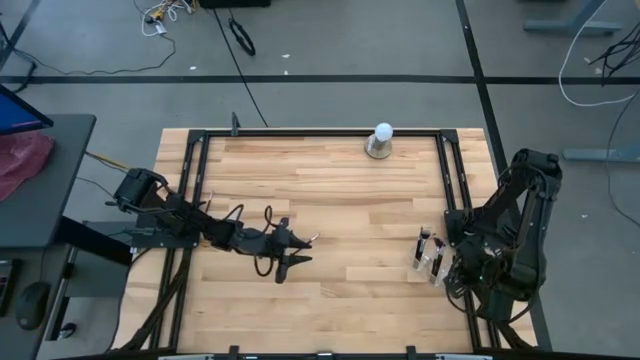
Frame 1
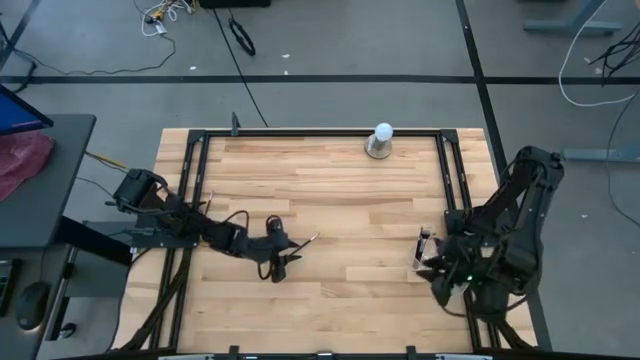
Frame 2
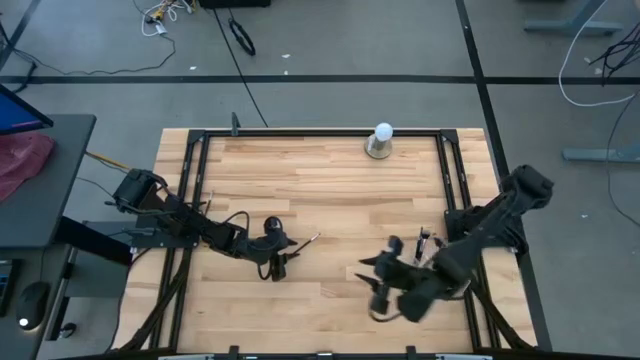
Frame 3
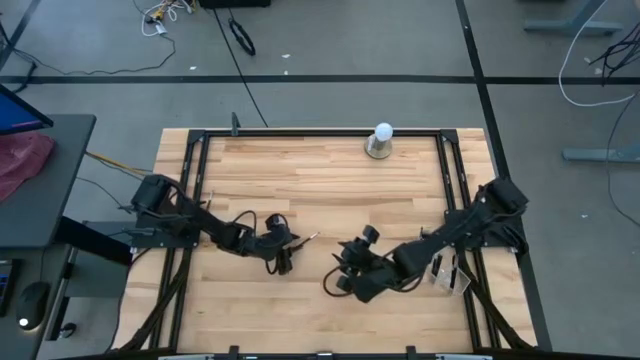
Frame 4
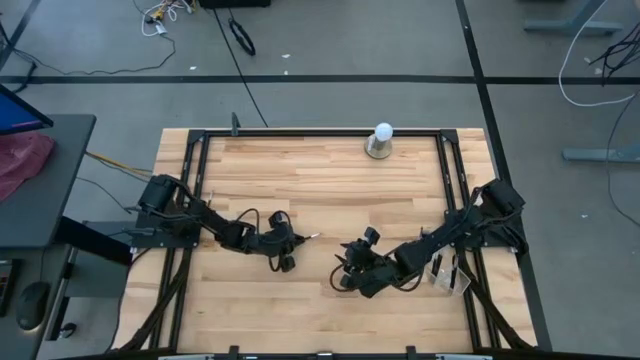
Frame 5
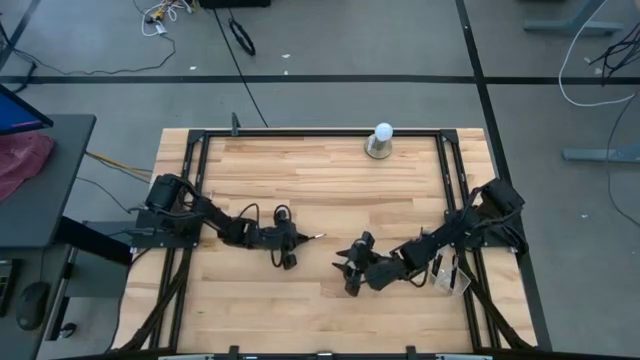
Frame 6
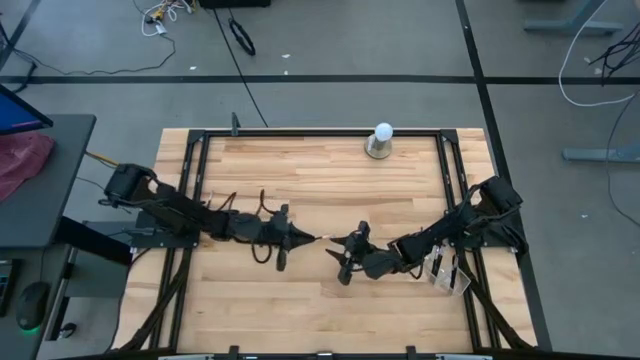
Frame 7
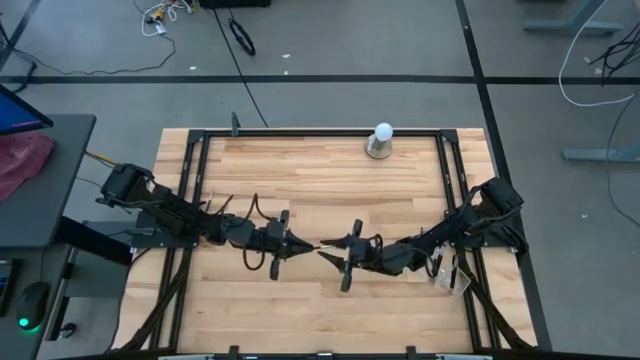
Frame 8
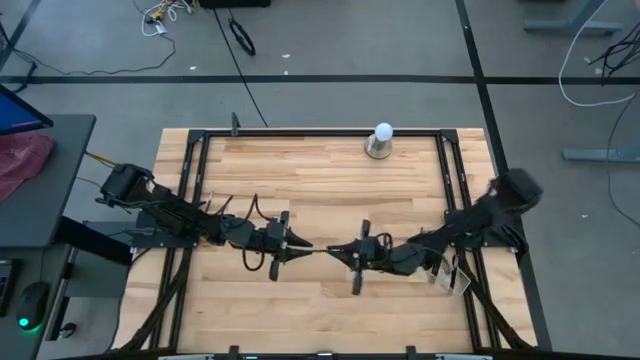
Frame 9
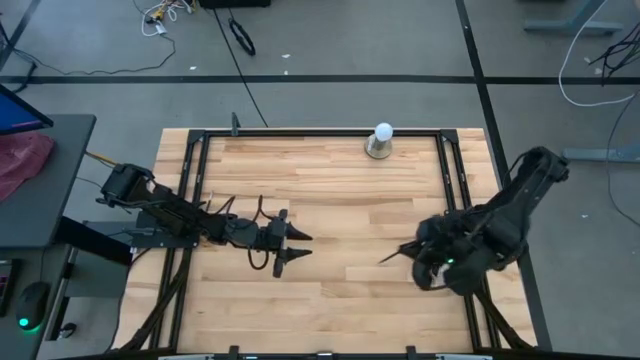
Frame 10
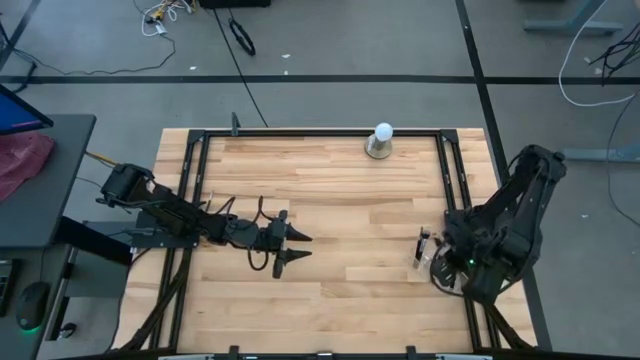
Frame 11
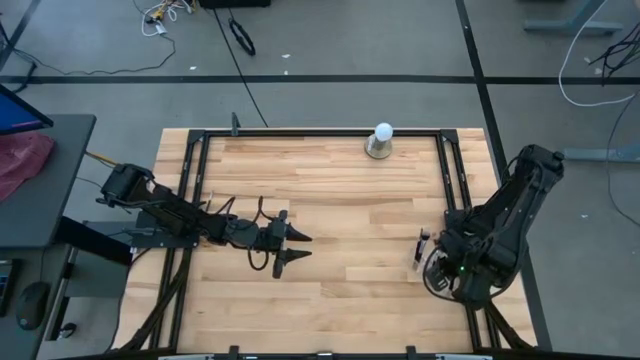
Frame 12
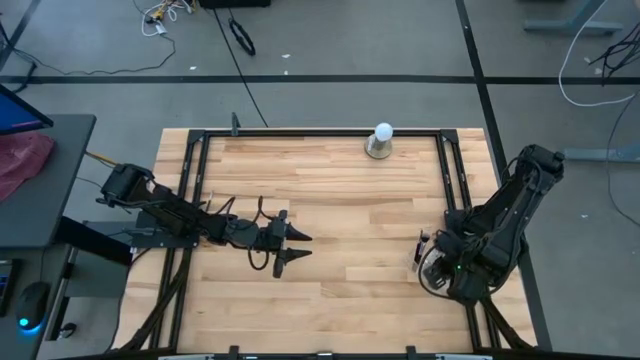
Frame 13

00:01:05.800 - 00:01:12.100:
Task: Put items in baskets/containers
Put the black eyeshadow brush into the transparent organizer

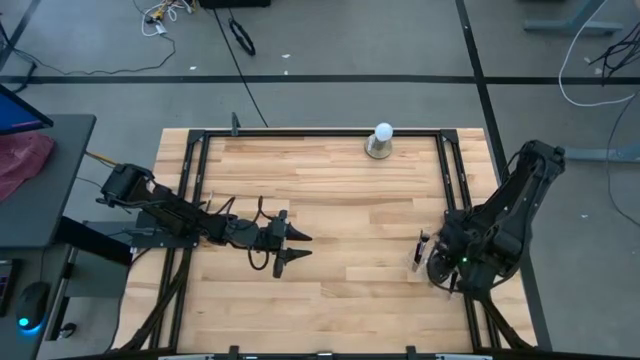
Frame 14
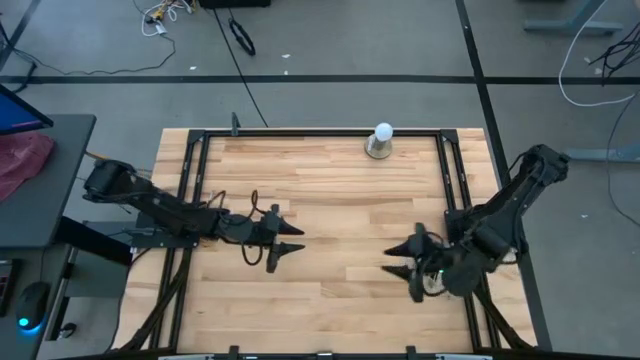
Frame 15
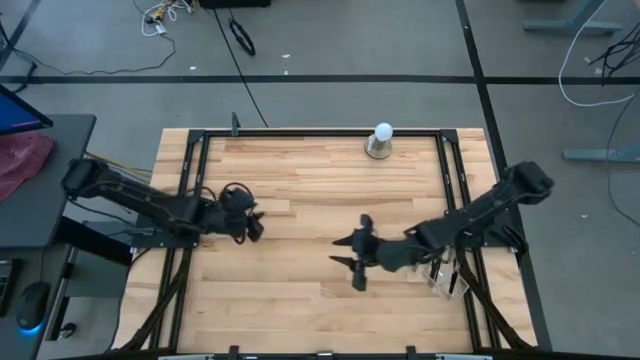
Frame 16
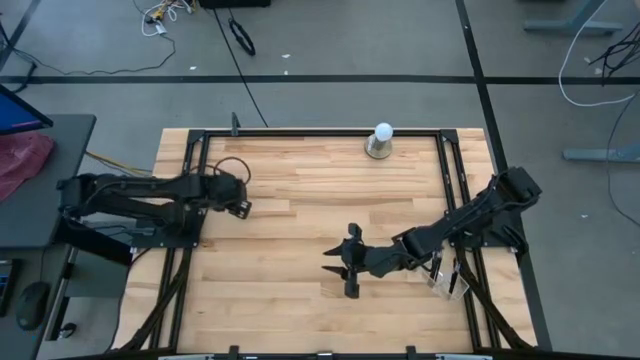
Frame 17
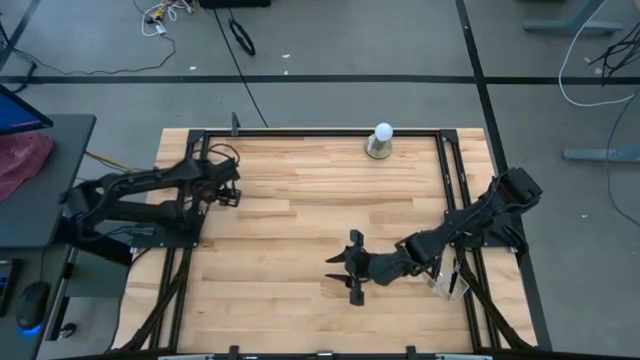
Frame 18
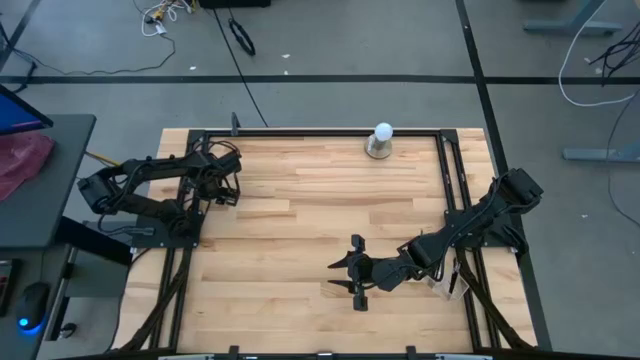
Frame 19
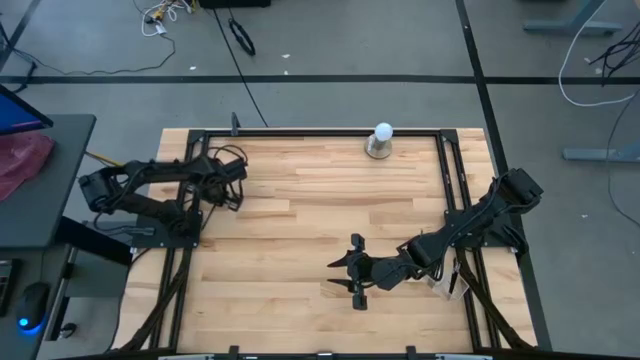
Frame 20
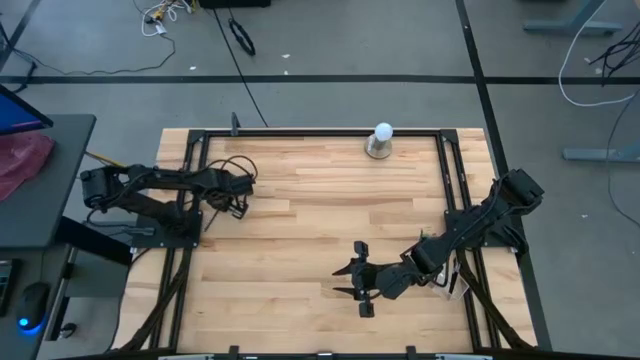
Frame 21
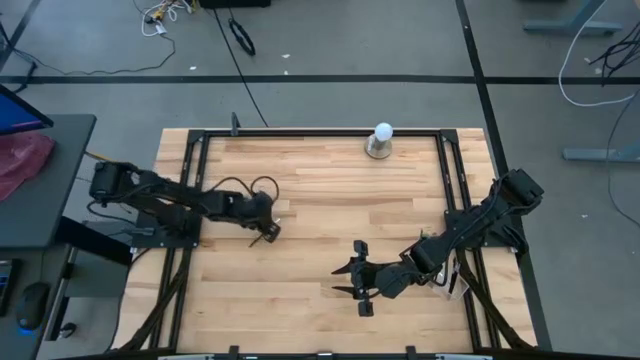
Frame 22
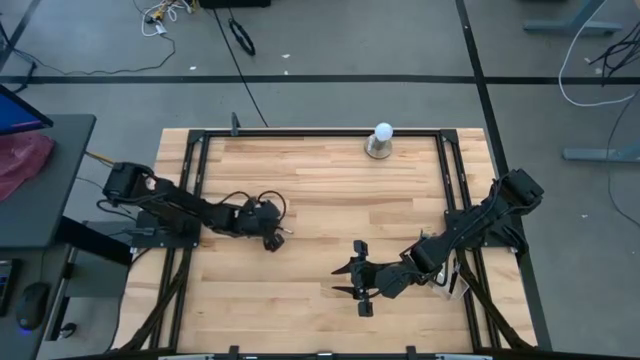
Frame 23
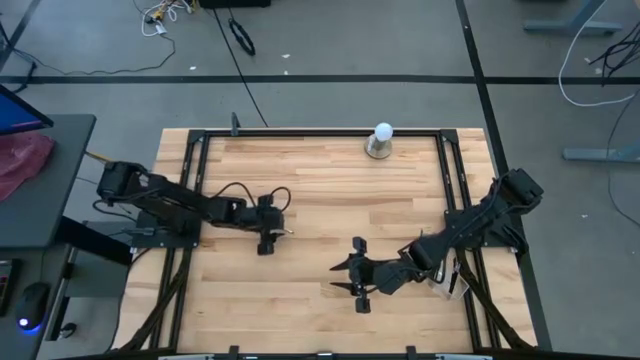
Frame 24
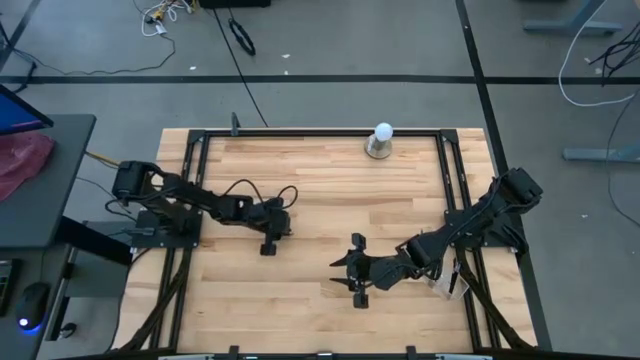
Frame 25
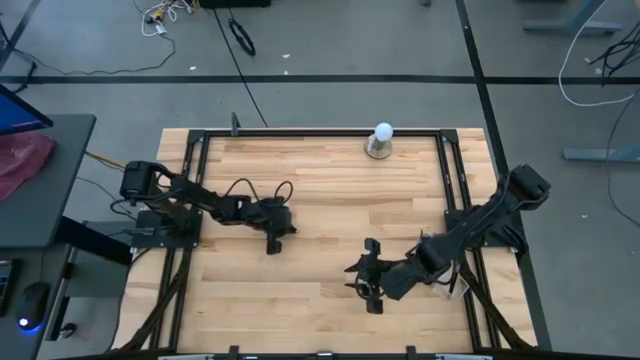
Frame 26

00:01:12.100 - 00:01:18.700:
Put the black eyeshadow brush into the transparent organizer

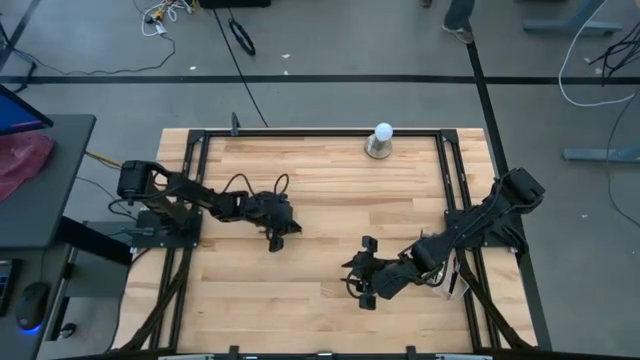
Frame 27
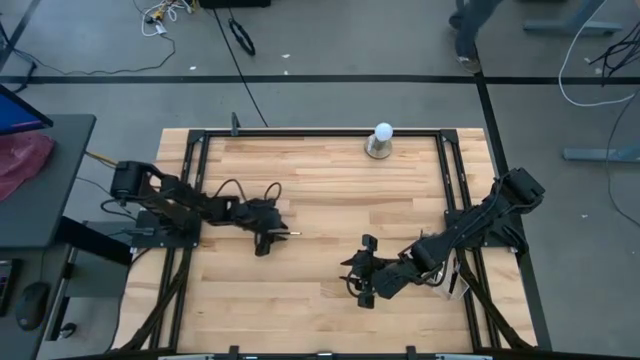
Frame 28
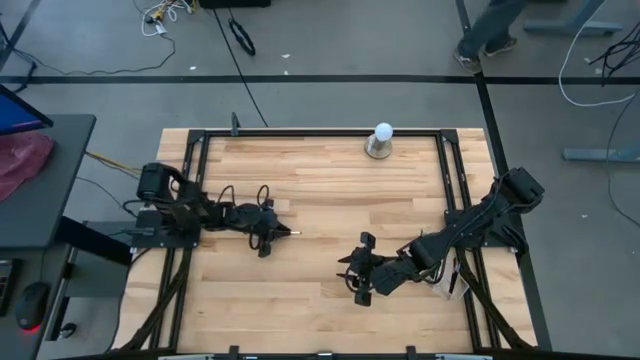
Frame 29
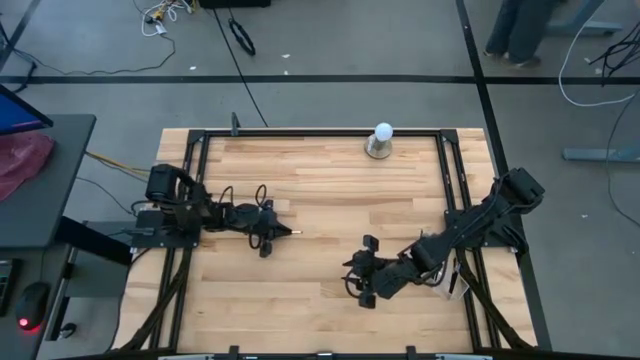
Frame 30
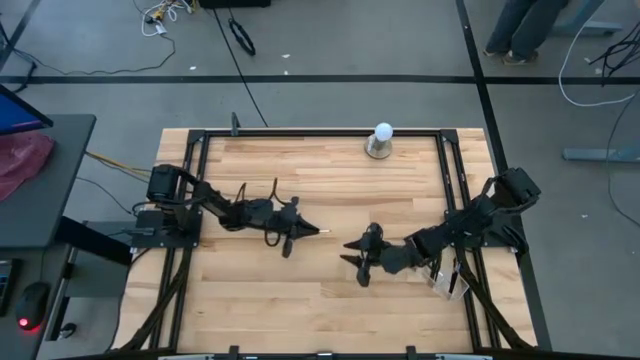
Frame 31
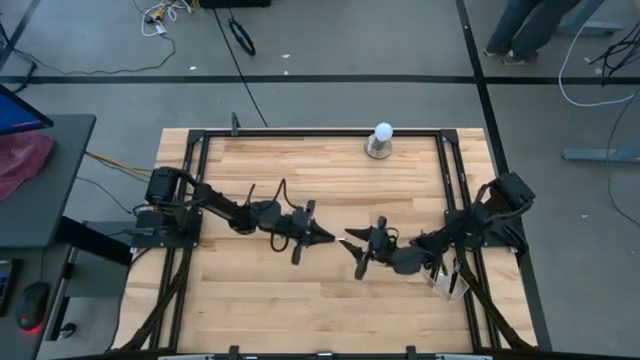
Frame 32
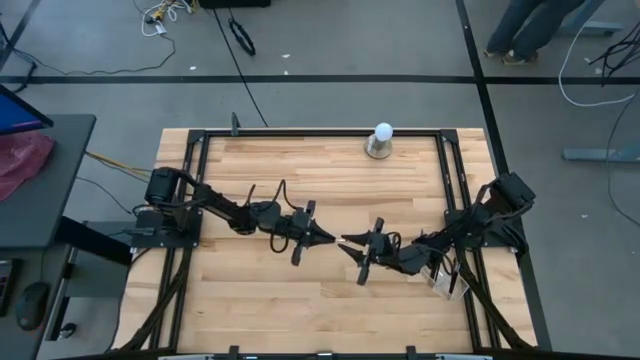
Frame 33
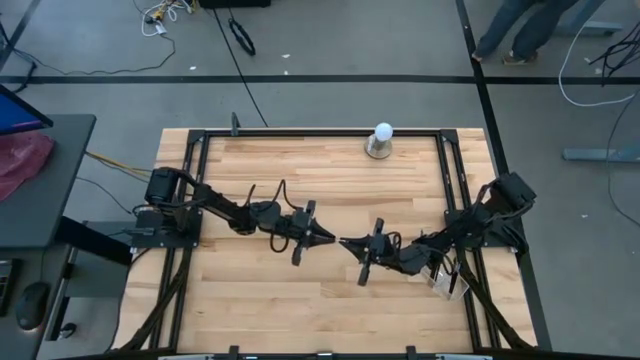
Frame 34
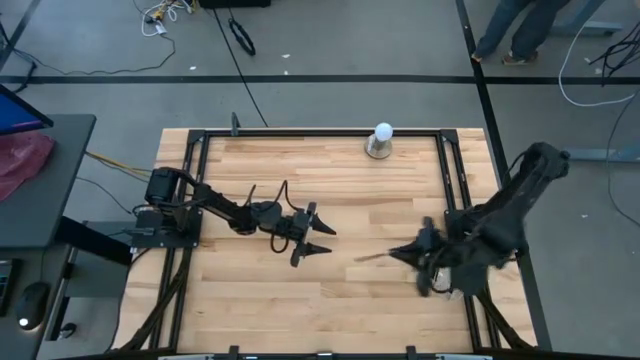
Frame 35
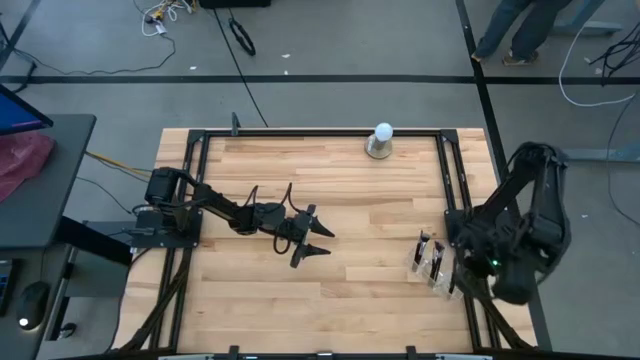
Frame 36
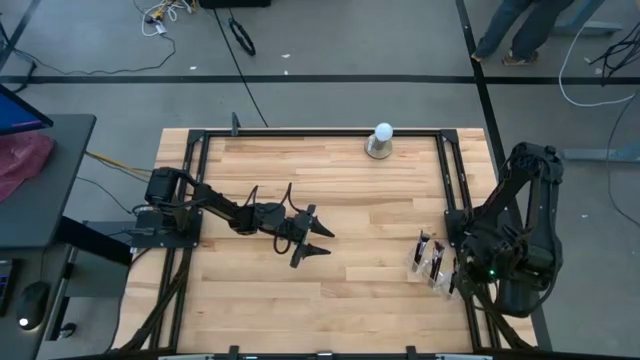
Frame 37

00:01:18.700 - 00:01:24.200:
Put the black eyeshadow brush into the transparent organizer

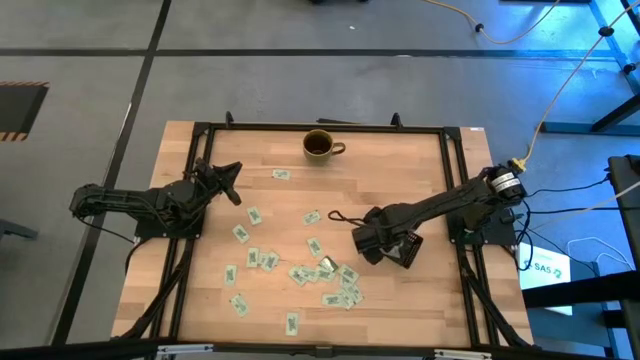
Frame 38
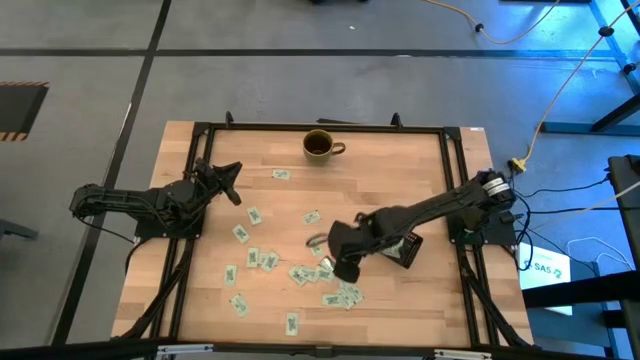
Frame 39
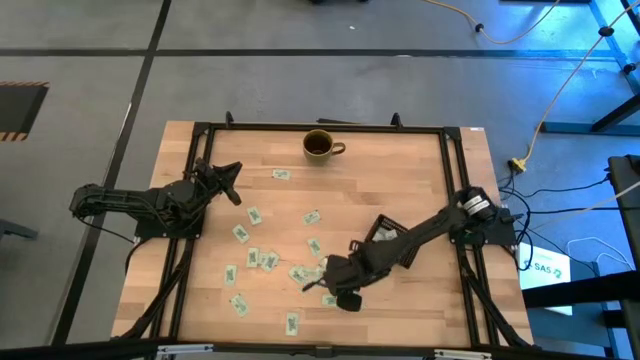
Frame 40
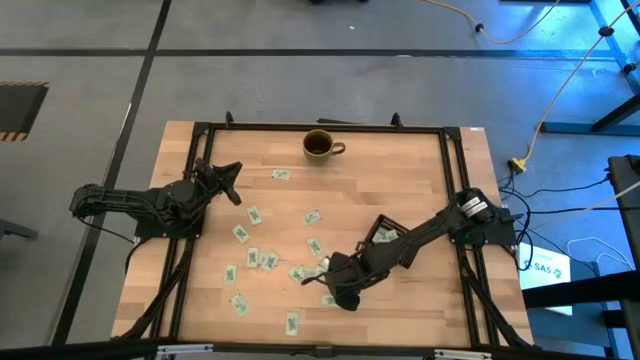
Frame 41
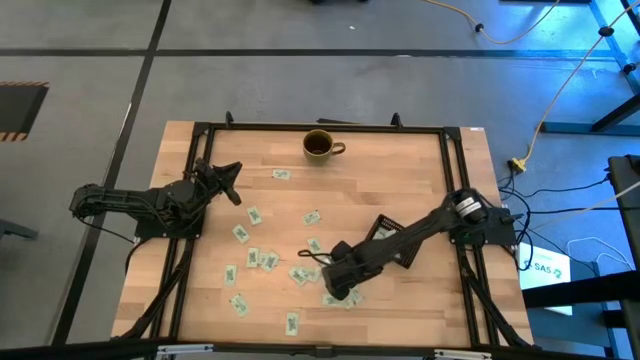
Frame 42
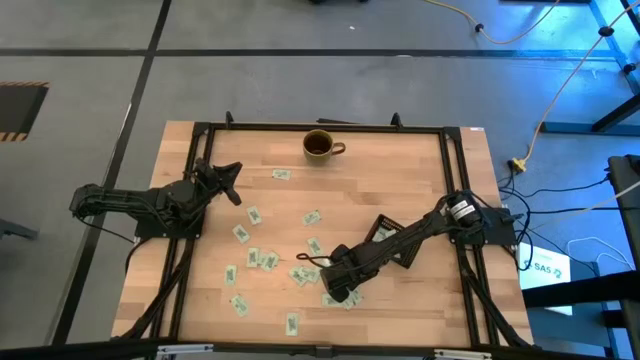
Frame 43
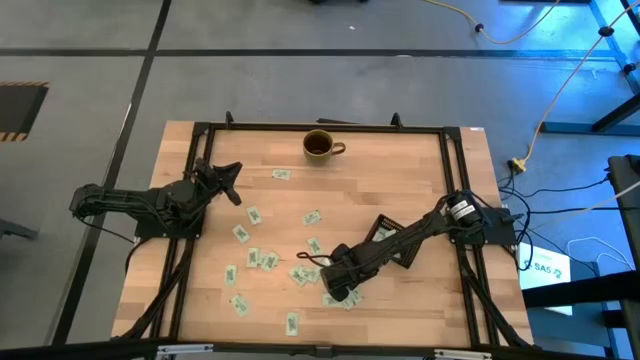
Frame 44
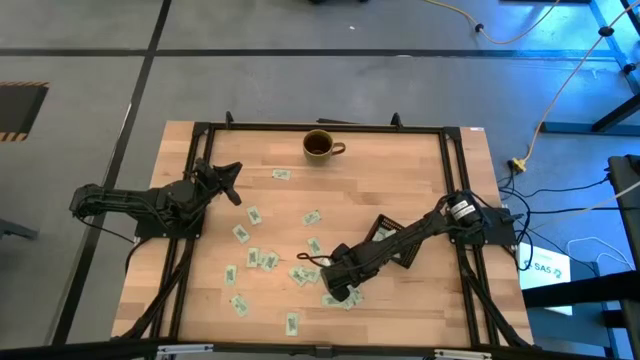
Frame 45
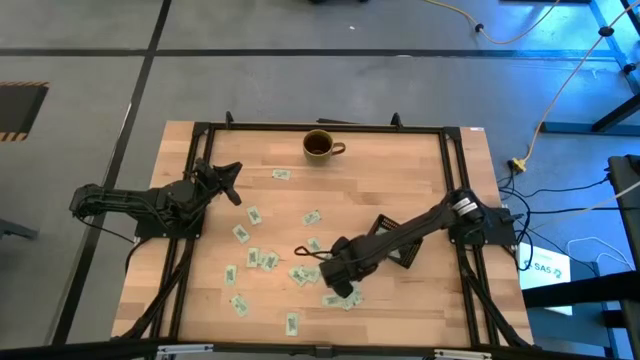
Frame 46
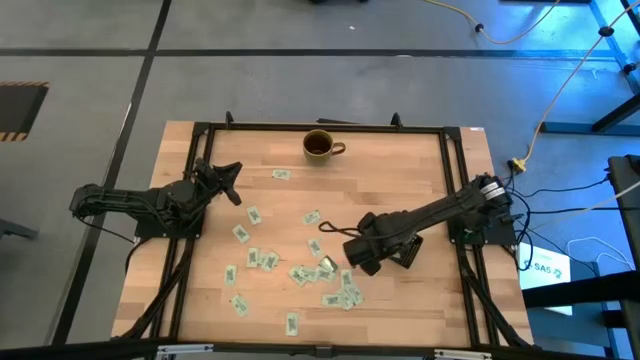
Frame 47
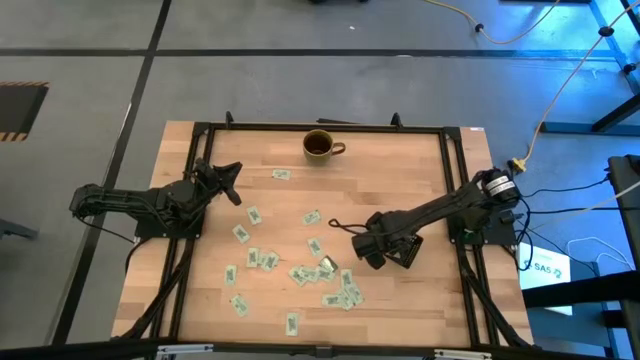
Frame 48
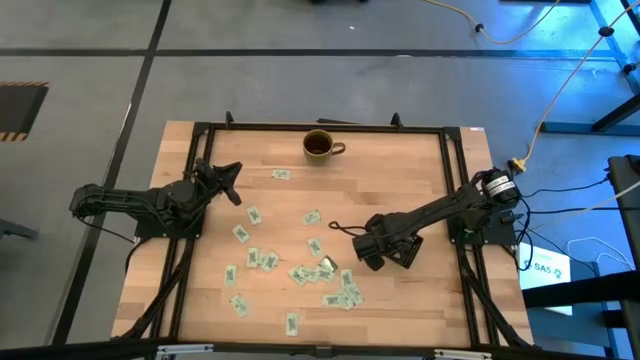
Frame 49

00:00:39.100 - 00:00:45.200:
Task: Pick and place Stevia / Truvia into bins
Put the stevia packet into the black bin
